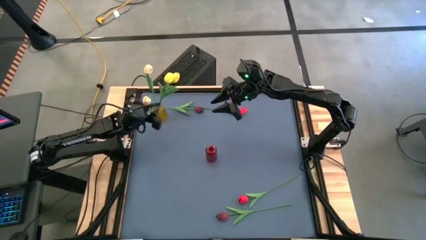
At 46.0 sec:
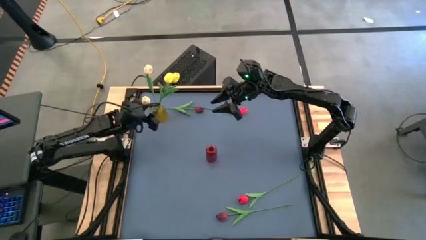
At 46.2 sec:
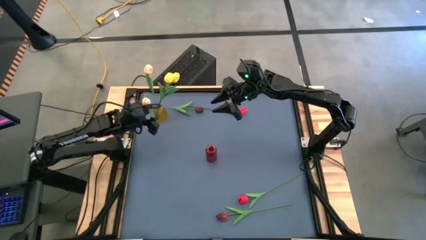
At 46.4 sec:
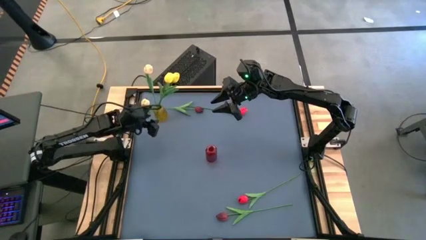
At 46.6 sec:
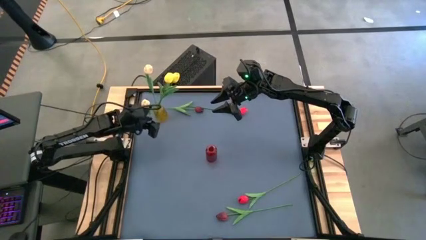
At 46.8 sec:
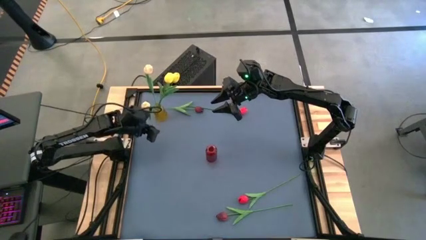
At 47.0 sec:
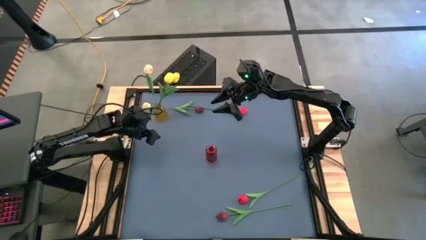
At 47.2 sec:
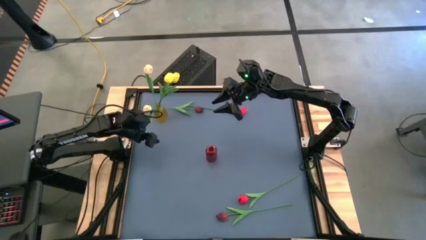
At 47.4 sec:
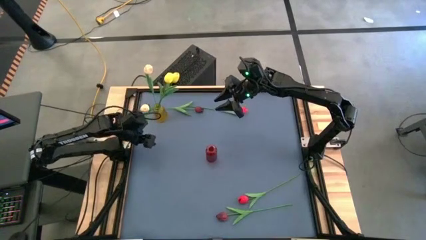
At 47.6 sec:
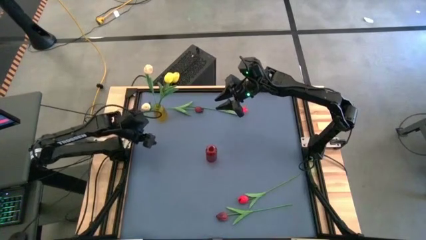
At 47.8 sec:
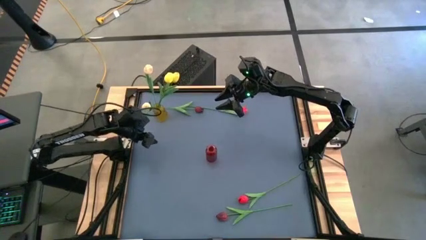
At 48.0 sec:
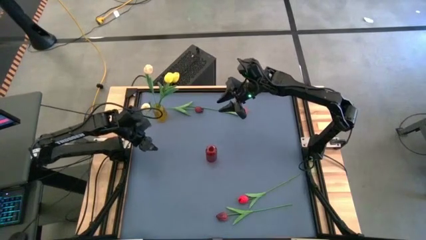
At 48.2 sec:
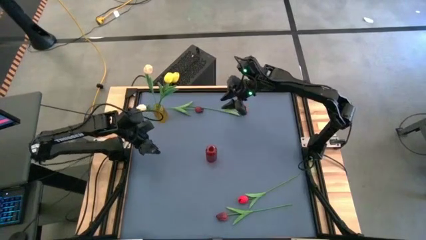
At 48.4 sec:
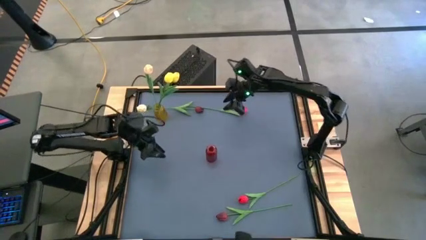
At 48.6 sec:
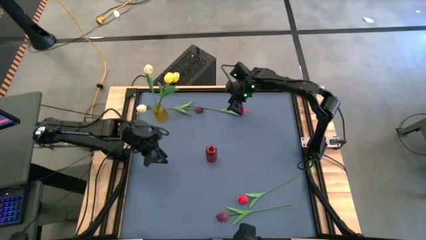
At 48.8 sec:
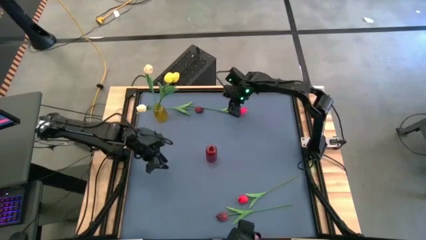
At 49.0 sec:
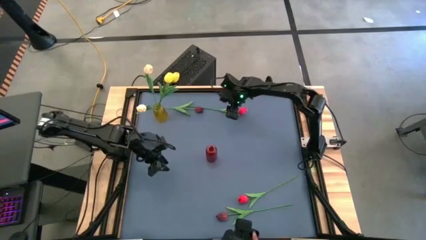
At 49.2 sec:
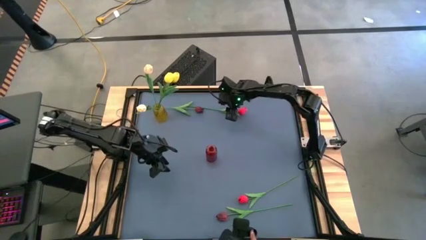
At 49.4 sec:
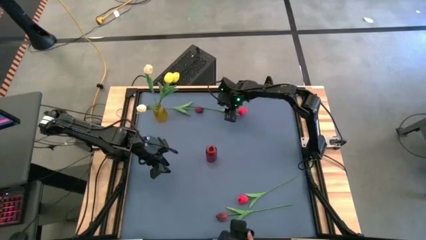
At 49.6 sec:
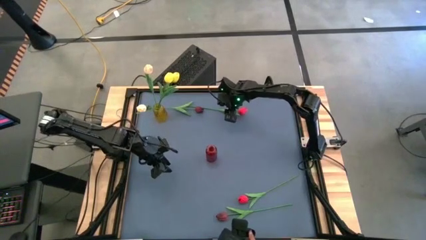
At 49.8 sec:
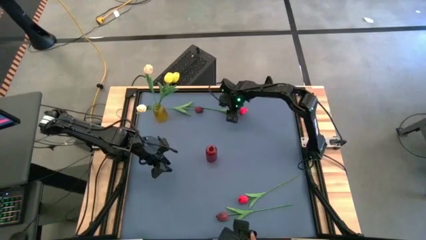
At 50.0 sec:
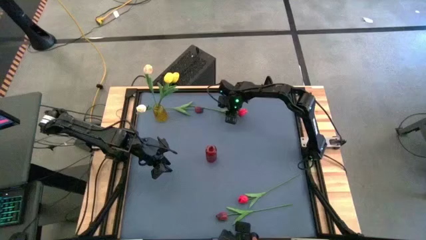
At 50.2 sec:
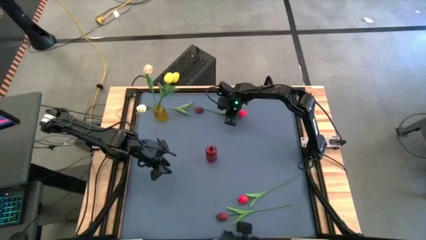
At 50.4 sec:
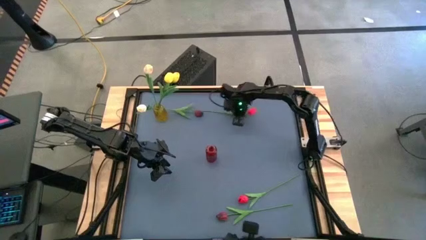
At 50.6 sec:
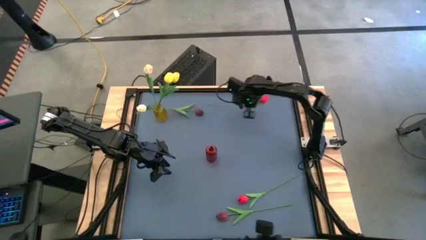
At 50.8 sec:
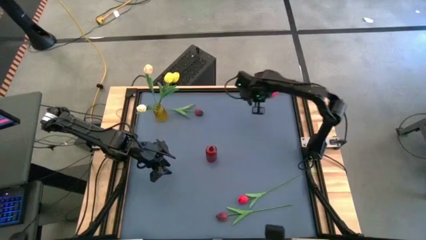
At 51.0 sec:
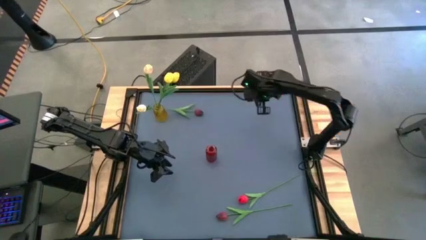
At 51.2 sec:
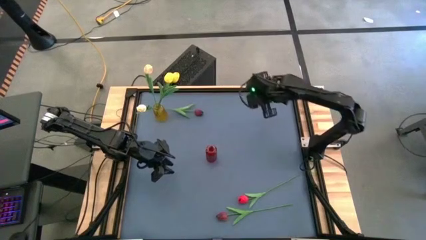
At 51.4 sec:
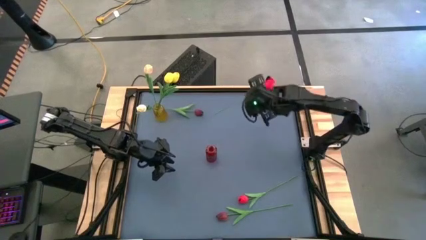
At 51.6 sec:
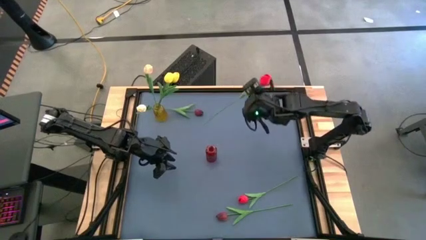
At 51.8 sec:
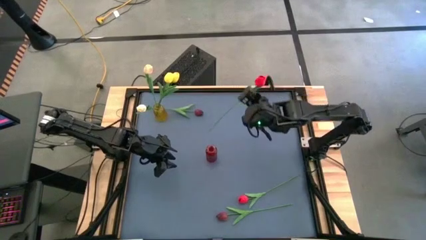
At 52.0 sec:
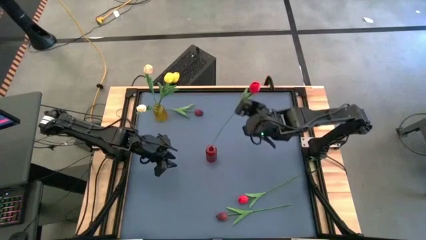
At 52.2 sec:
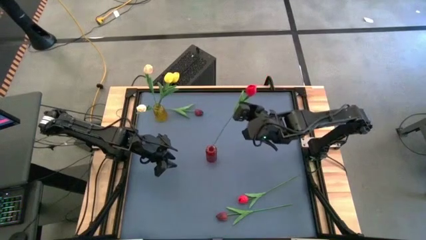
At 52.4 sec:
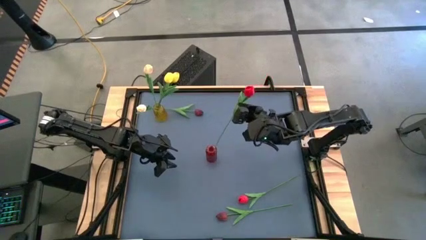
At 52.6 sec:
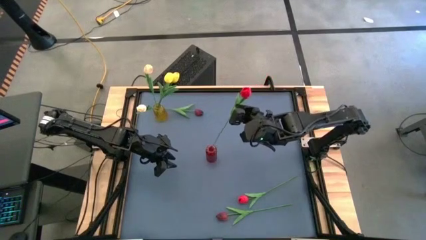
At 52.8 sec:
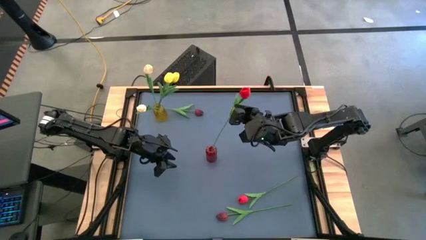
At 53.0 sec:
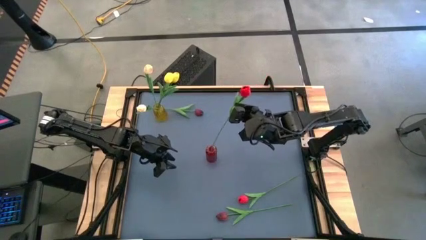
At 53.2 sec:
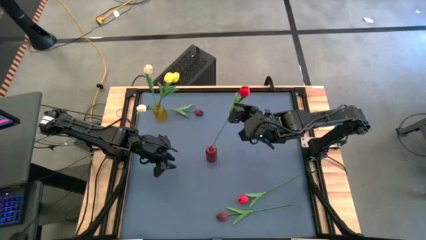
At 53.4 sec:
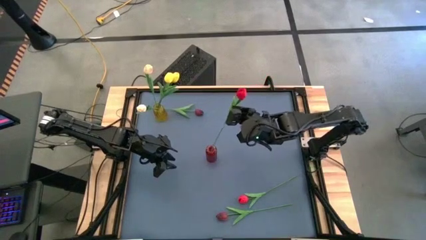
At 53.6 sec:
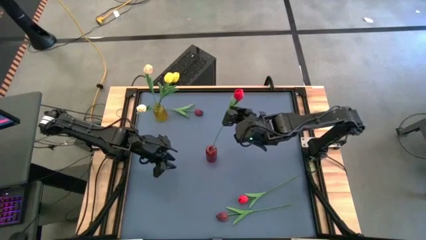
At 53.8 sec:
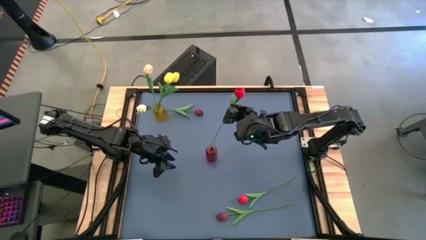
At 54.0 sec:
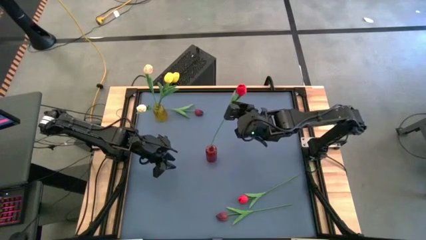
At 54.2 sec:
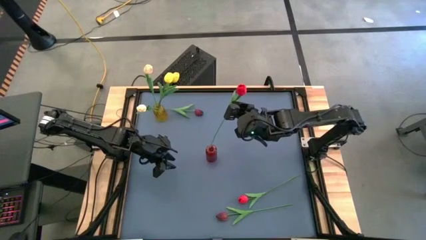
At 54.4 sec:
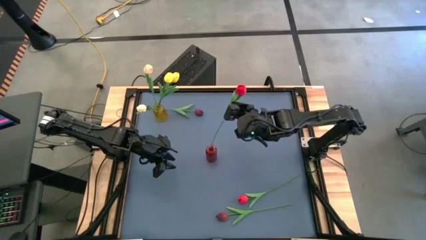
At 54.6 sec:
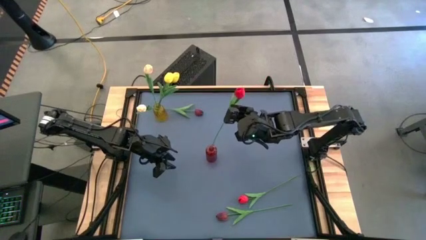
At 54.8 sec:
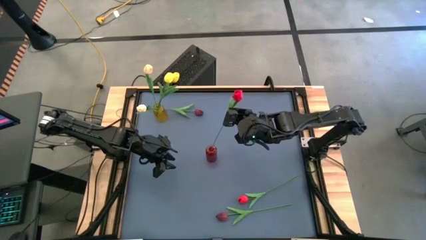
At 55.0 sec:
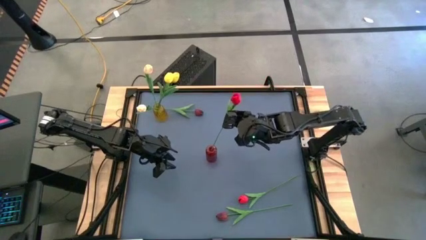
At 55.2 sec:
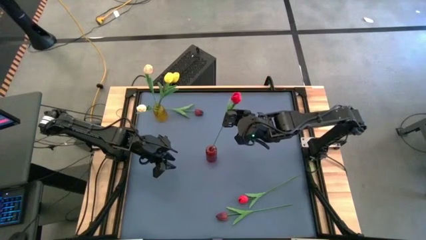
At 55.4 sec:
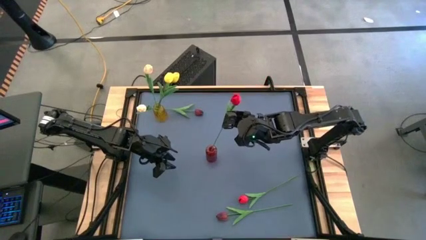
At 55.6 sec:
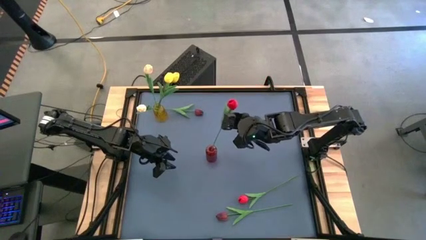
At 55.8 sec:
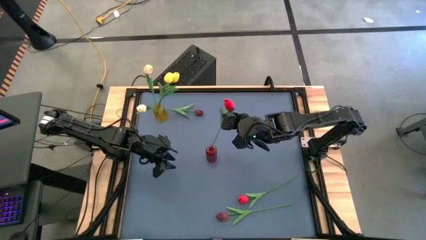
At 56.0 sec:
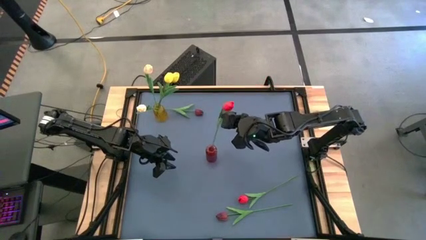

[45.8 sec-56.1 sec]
Task: Sort flowers into vase by color
Put the top pink flower into the red vase

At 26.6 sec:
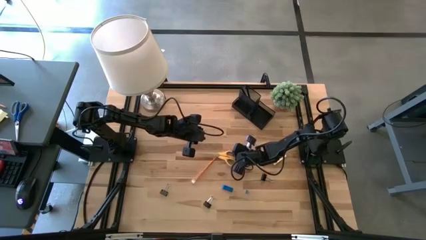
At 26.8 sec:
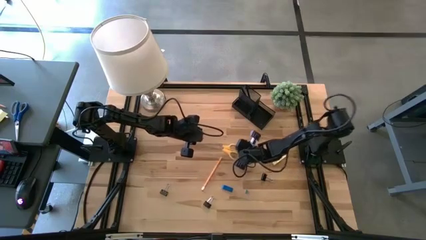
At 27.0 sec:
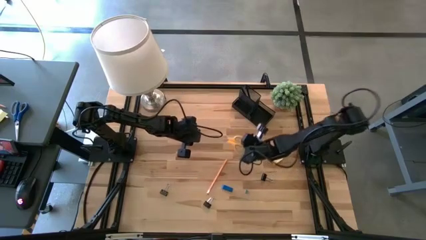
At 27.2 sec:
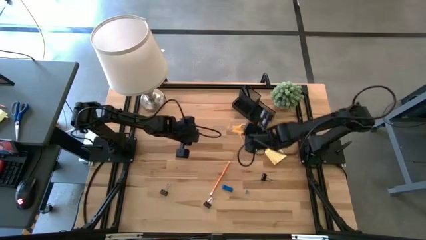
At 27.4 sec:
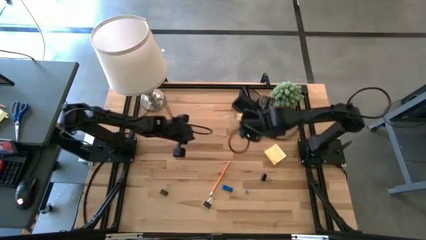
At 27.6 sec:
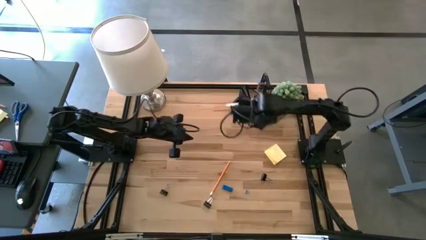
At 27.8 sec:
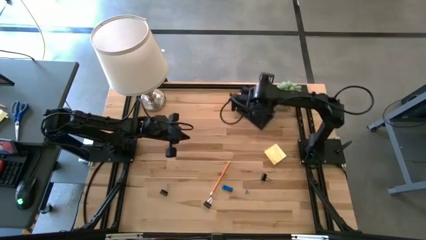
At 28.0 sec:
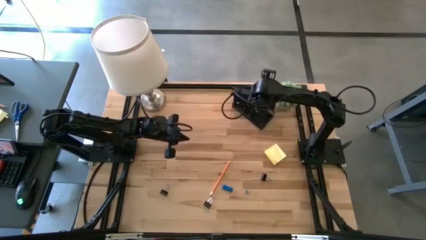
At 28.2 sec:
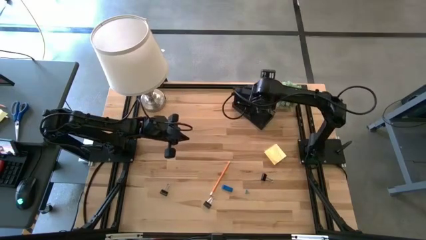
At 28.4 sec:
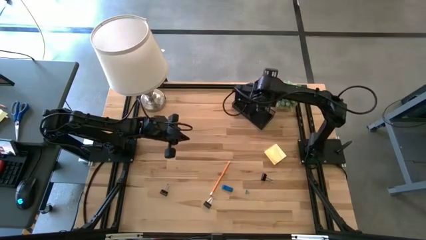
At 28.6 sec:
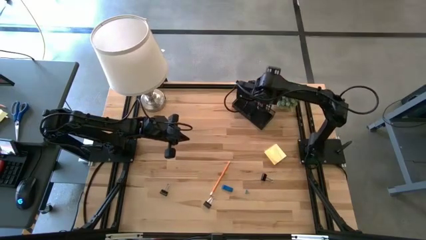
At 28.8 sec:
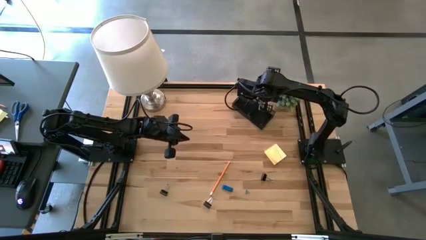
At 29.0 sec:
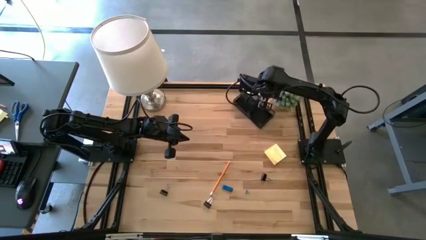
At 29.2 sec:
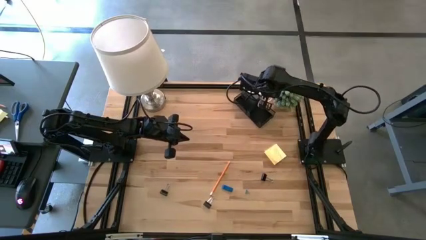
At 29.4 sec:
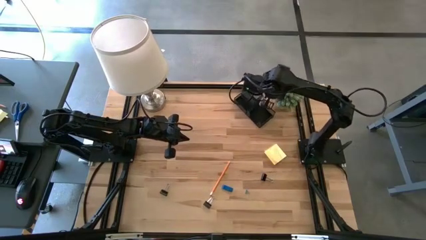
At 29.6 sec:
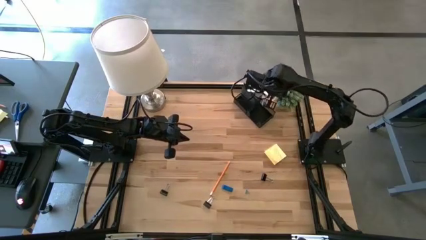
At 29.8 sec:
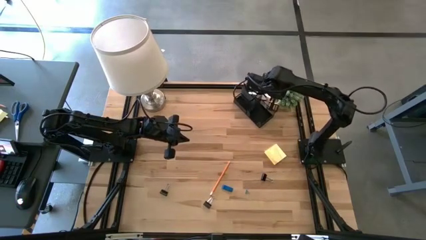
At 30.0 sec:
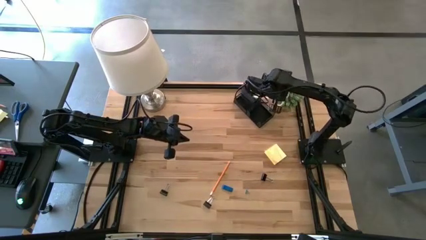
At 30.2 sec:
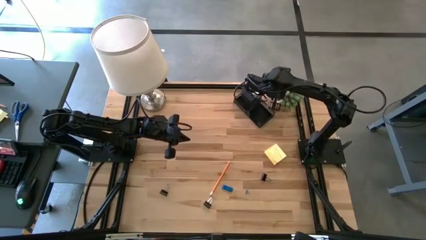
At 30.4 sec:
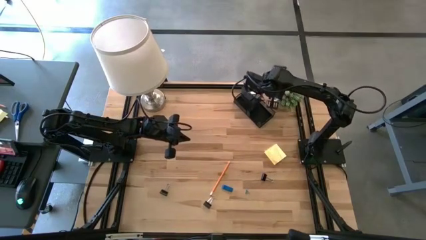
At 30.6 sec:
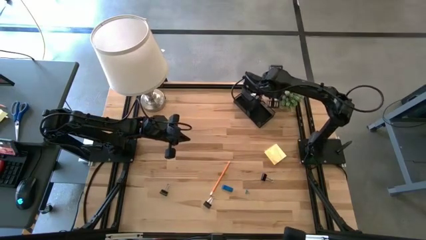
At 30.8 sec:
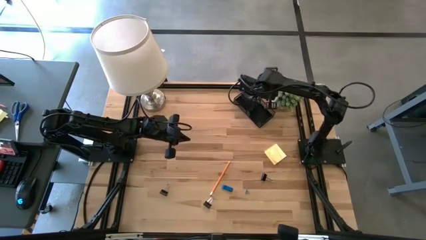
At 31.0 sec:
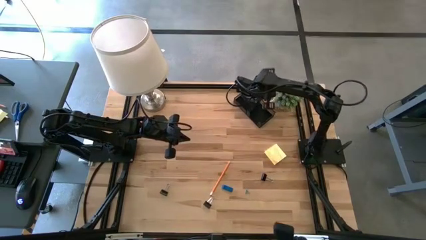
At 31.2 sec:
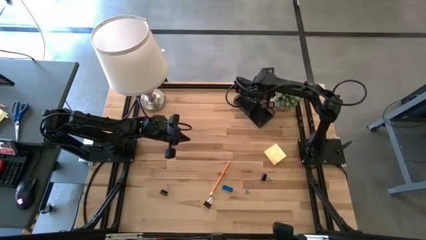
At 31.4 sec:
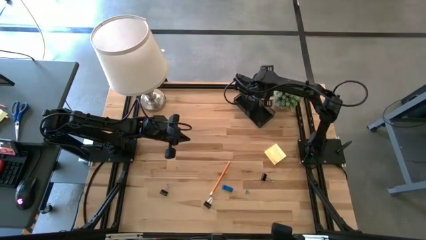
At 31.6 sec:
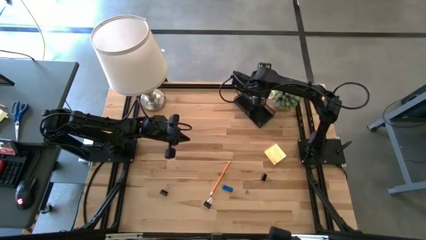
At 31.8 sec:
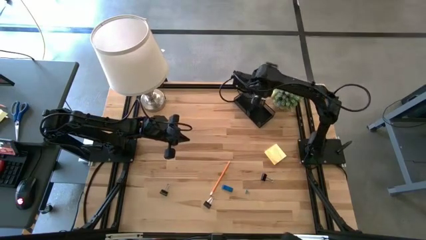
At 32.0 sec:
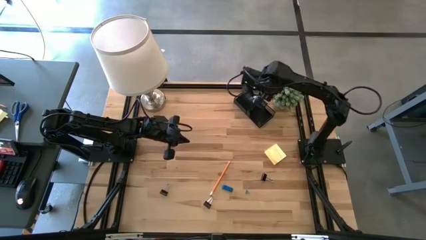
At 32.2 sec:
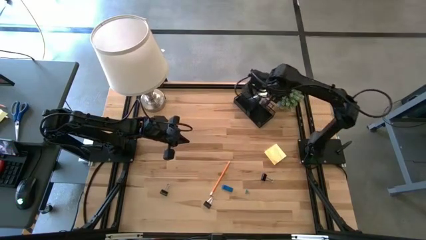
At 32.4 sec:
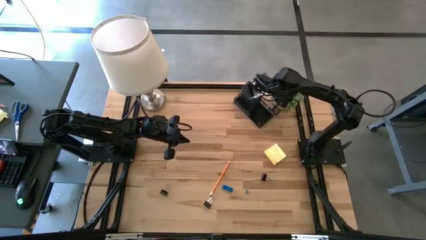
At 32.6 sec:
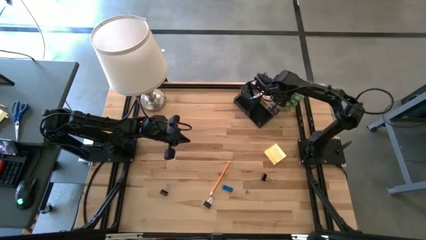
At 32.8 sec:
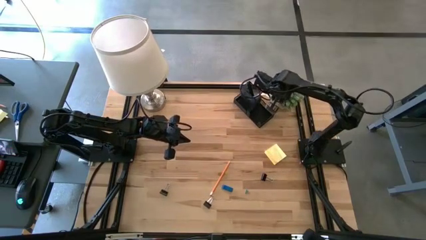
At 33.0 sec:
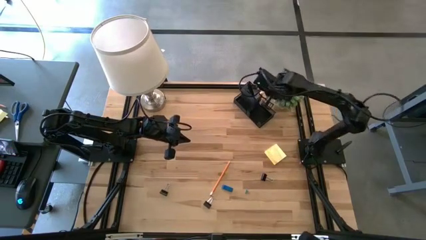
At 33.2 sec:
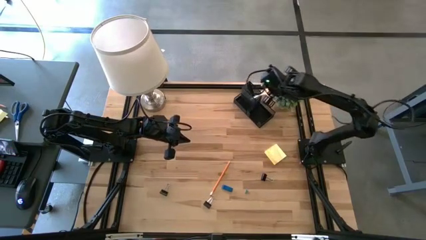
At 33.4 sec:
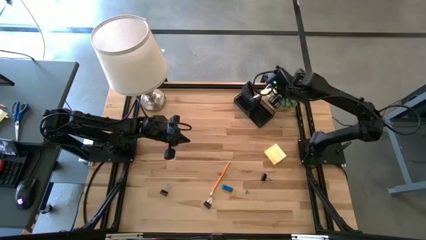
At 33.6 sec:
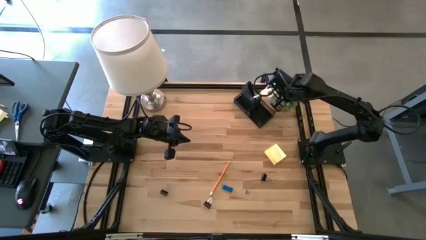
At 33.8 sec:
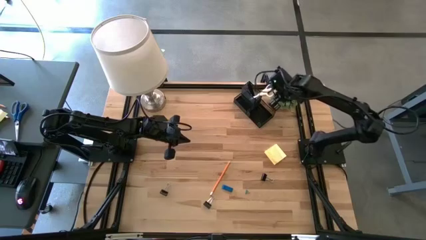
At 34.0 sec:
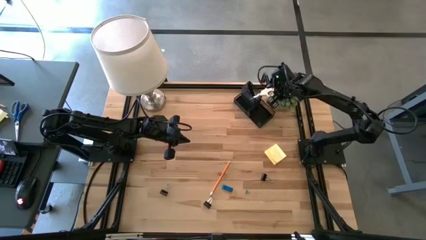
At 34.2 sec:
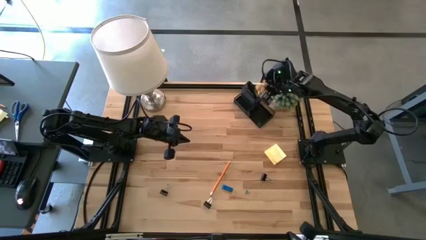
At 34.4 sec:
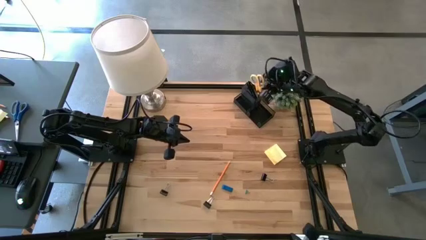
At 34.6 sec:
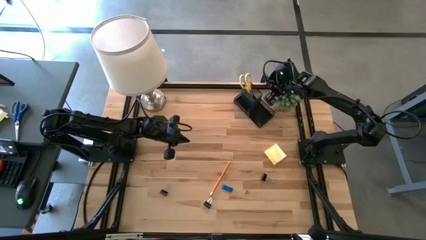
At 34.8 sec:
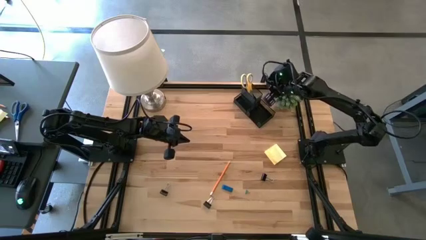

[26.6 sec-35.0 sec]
Task: Pick and place office supplies into organizer
Put the yellow scissors into the desk organizer
